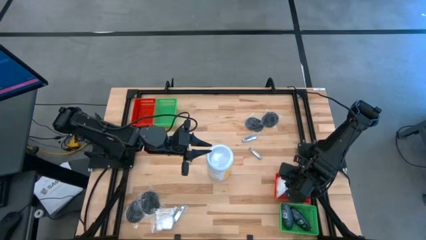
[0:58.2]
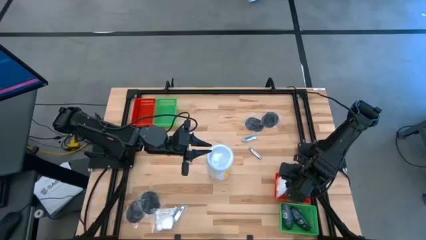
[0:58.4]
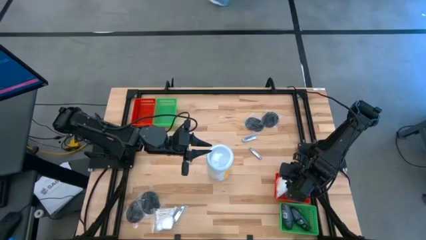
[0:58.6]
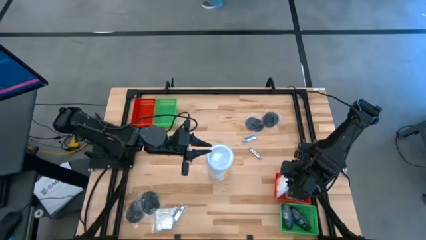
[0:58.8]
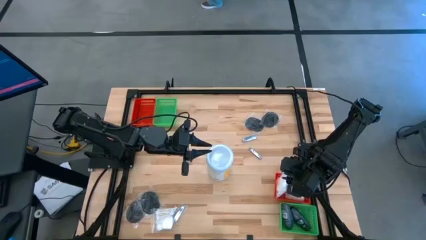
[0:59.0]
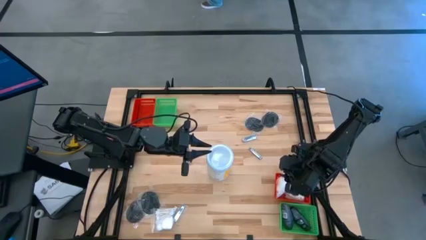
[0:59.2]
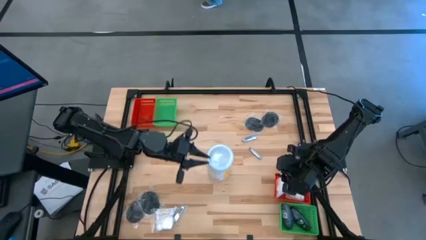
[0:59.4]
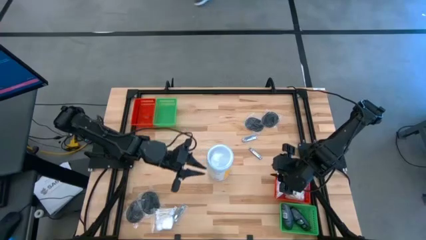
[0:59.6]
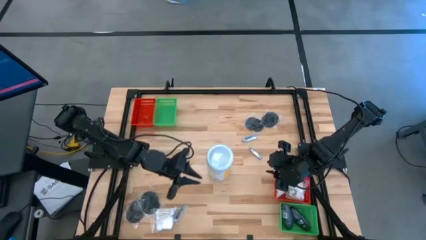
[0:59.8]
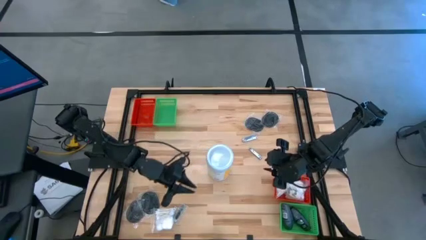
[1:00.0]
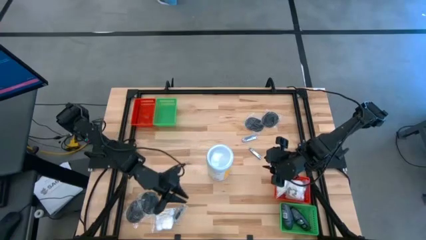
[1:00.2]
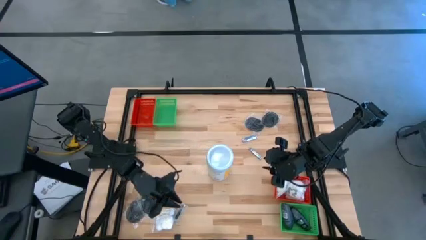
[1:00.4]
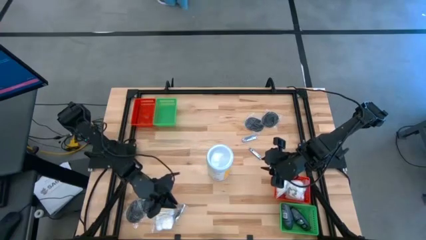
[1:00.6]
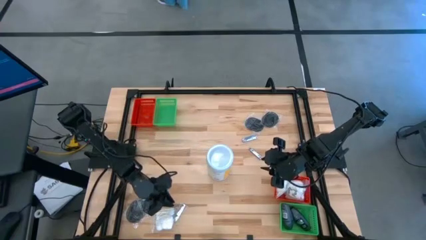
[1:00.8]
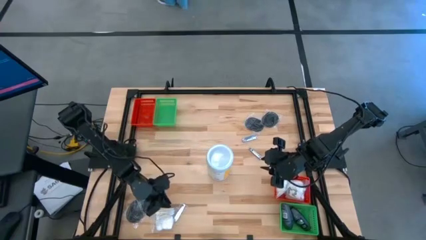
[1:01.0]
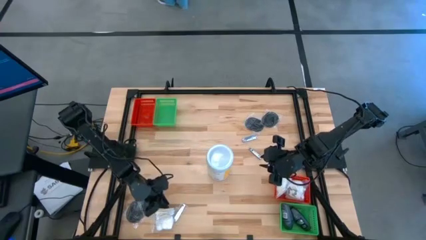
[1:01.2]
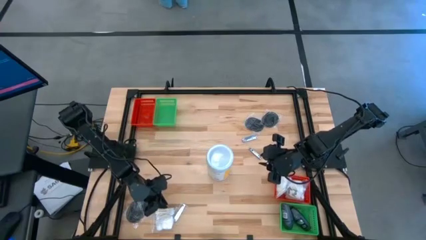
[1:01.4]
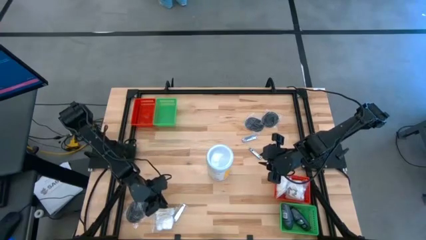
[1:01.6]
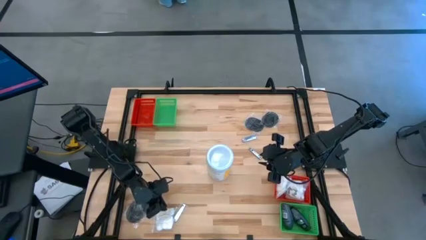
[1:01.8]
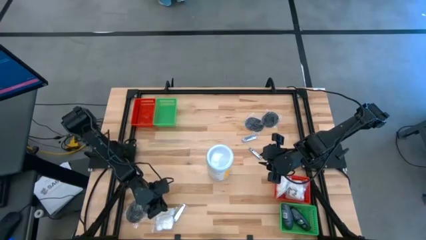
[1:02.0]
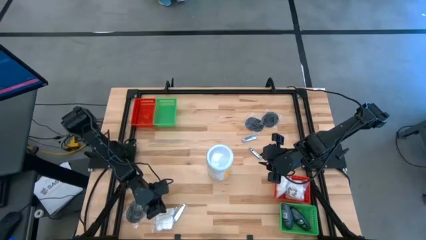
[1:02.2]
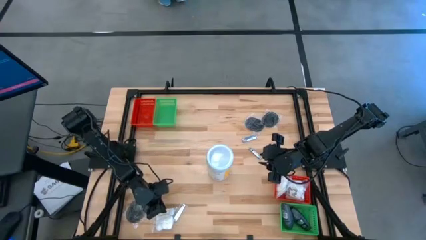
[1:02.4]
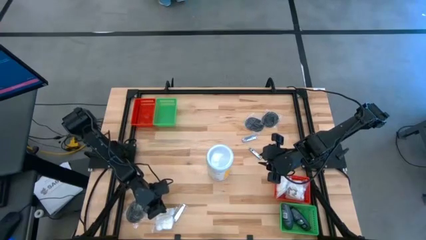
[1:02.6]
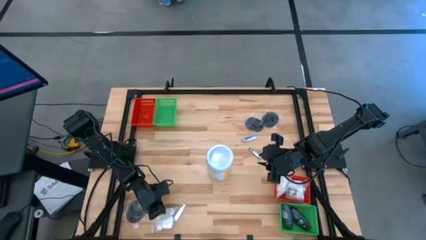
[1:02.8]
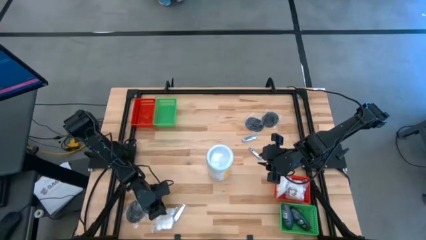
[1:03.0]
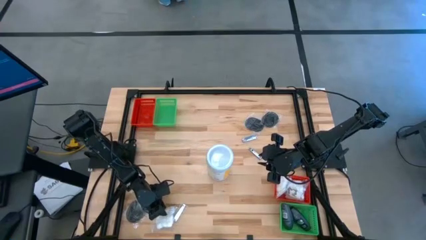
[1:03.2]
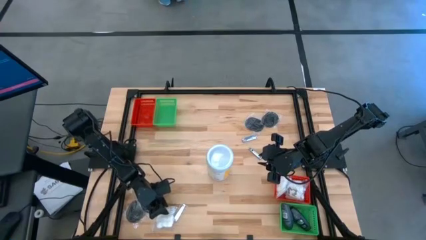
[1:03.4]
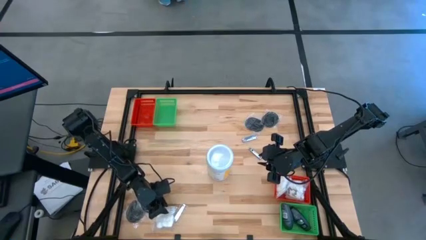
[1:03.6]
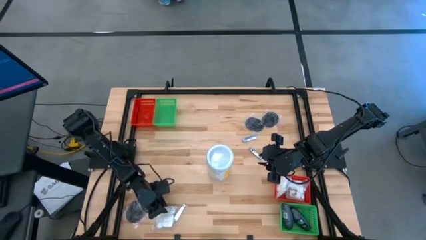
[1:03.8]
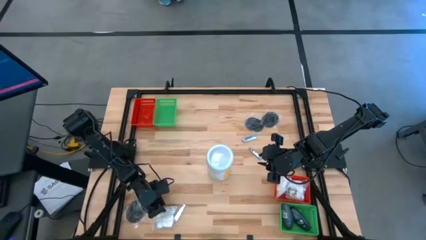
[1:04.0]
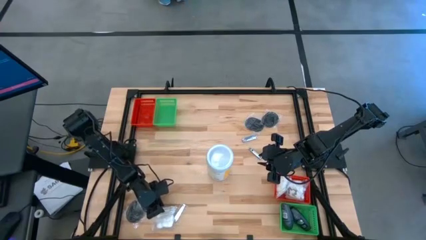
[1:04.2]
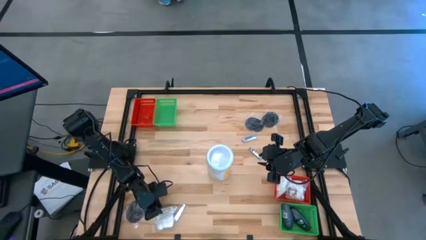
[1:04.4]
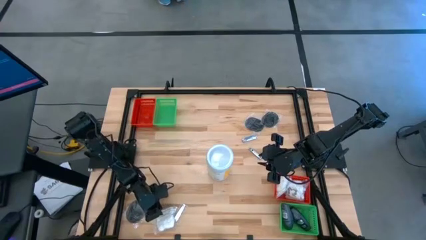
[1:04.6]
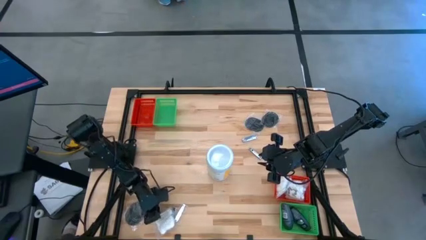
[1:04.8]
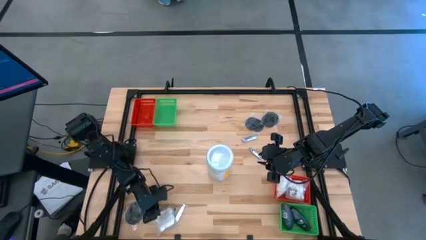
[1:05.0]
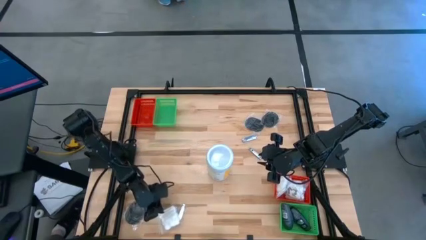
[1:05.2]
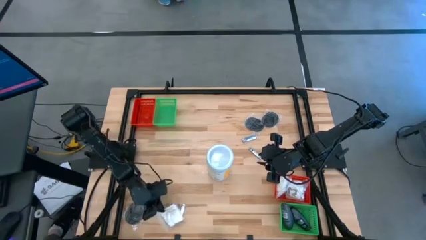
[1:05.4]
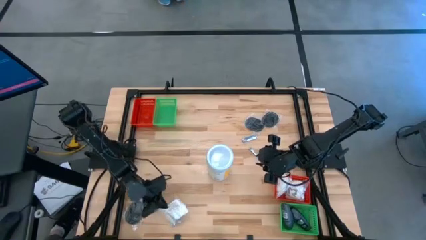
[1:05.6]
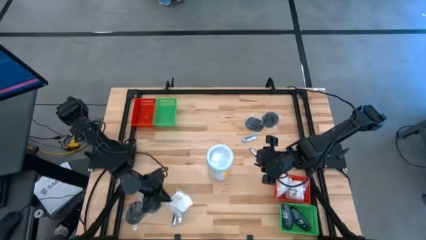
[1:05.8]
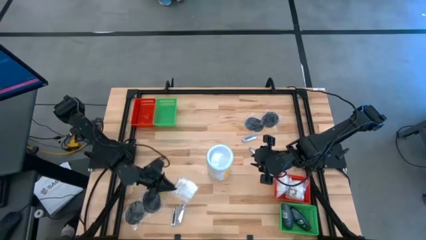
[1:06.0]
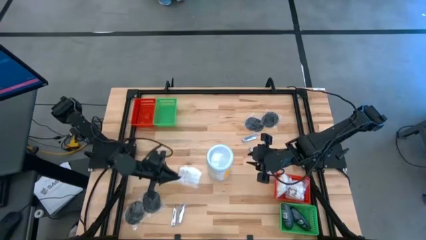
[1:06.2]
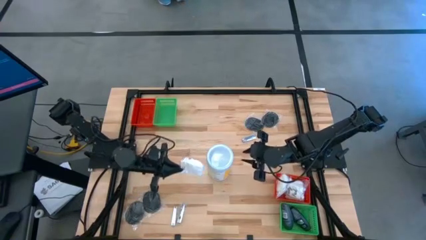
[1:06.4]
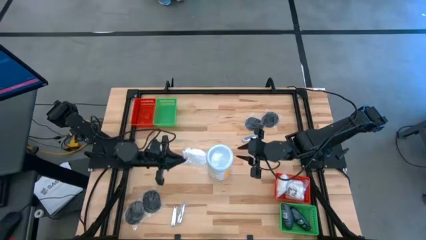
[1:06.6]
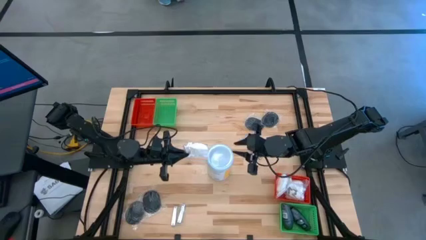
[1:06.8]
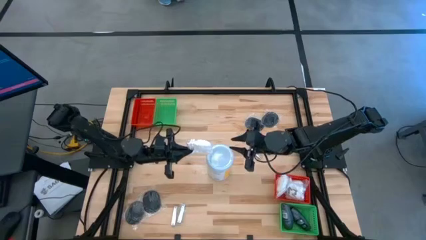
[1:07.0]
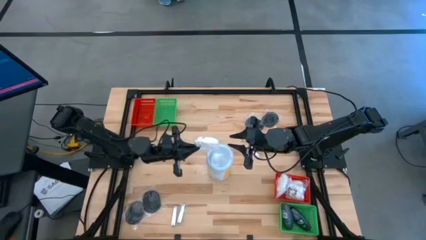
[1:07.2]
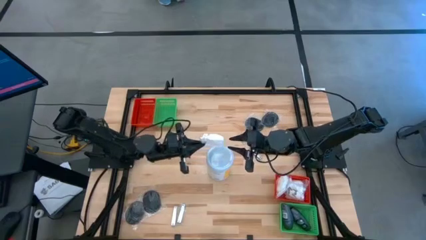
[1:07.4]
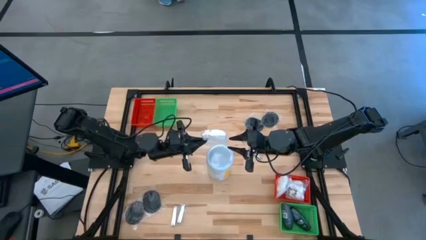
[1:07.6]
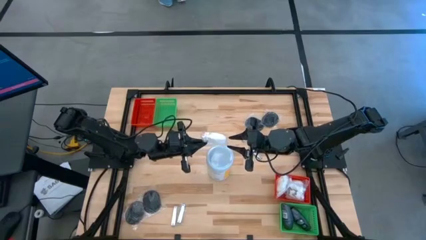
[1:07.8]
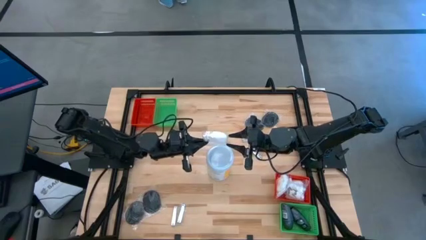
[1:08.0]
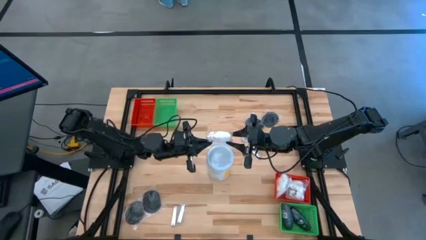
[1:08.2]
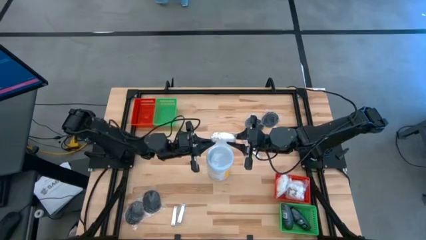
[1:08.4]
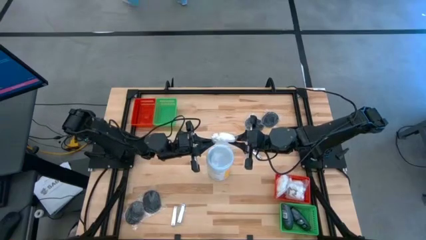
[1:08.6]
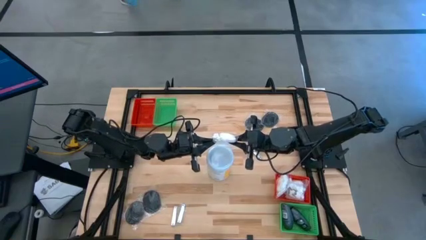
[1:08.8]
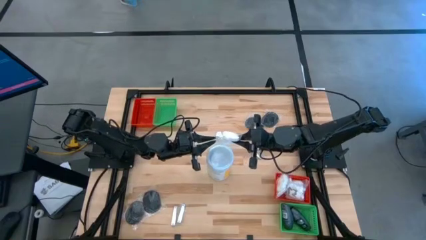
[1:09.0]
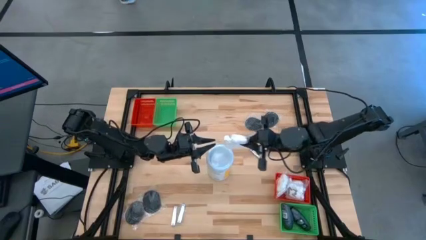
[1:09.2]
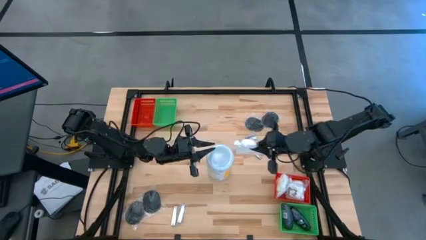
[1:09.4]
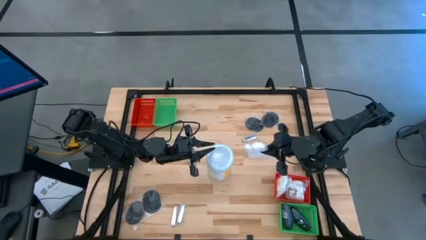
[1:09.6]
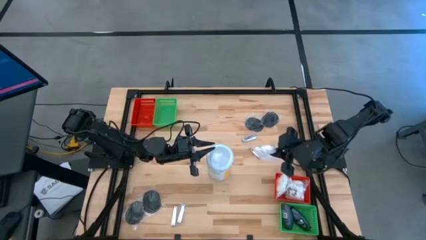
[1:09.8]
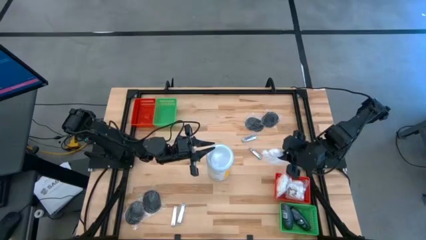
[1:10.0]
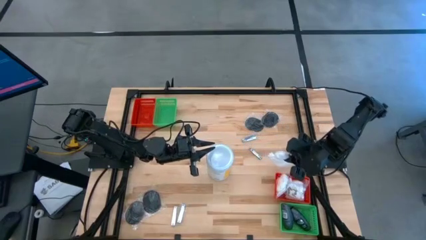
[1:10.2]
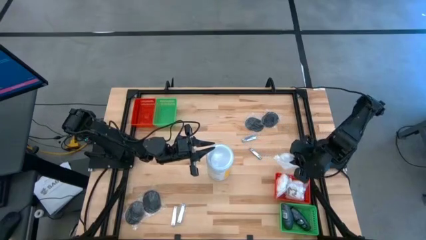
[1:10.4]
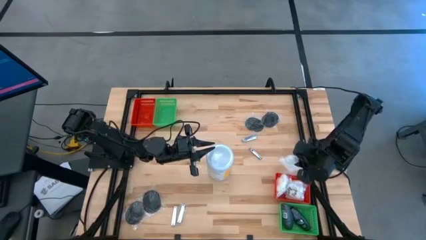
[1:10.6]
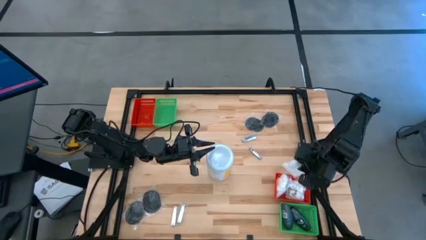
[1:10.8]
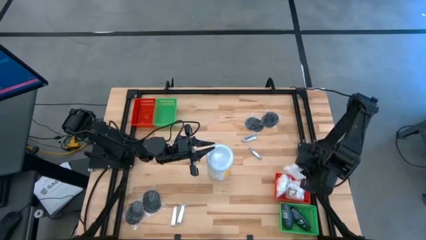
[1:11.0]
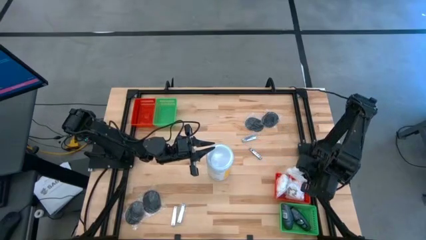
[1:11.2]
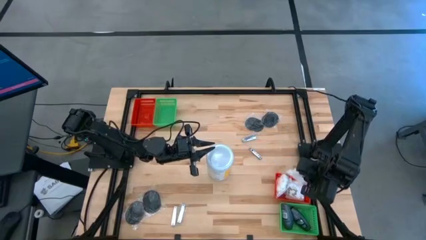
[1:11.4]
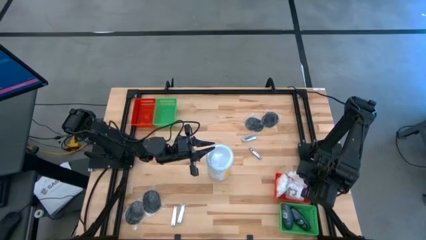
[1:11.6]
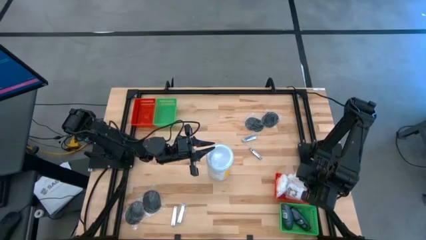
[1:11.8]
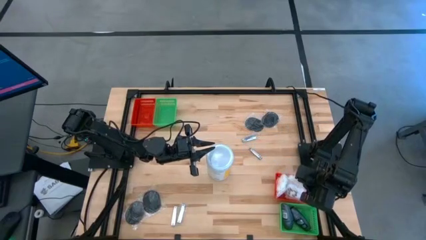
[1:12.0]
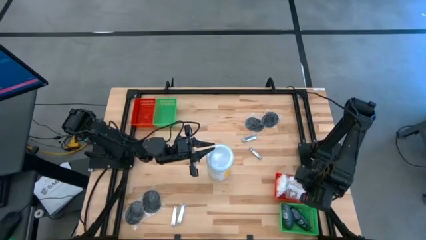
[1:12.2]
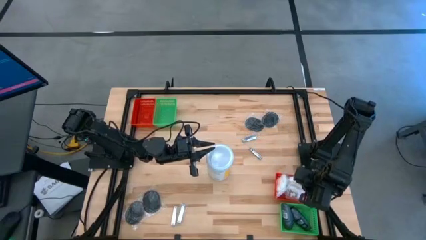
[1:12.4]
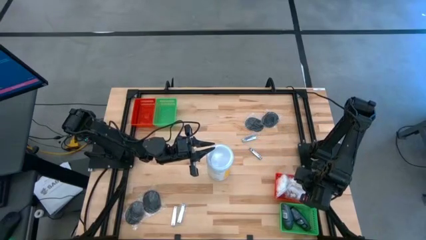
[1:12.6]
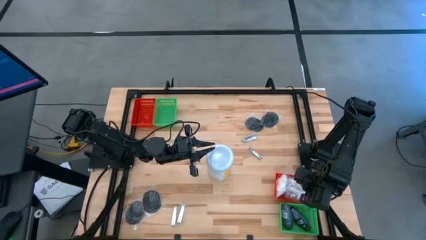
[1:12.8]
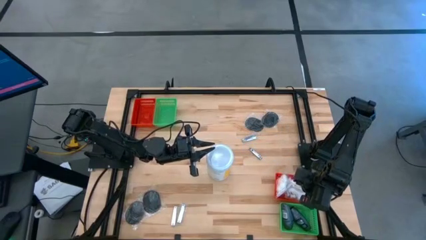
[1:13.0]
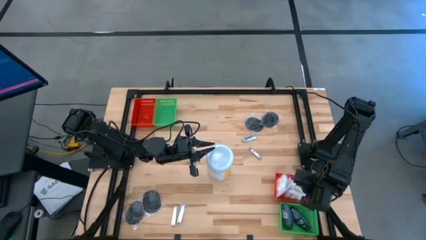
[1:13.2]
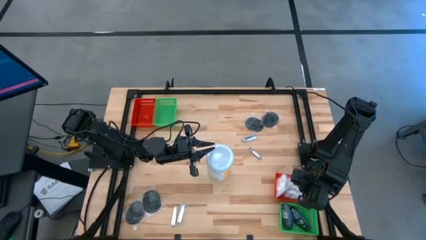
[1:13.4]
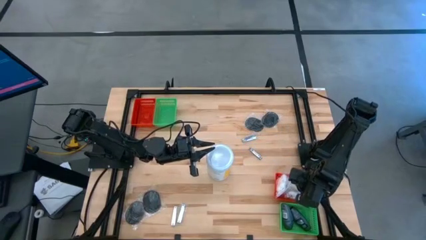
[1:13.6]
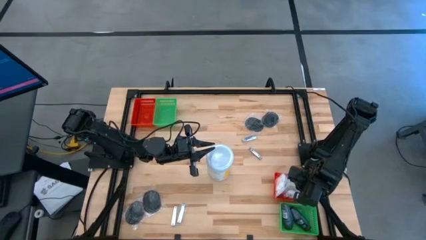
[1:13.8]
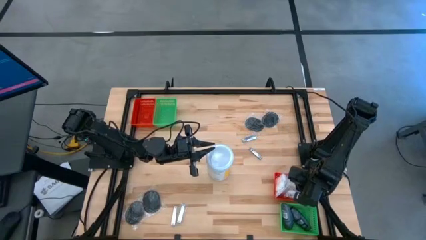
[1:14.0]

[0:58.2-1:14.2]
Task: Pick & Place Travel size toiletries
Put the white cotton pack into the bottom red basket
